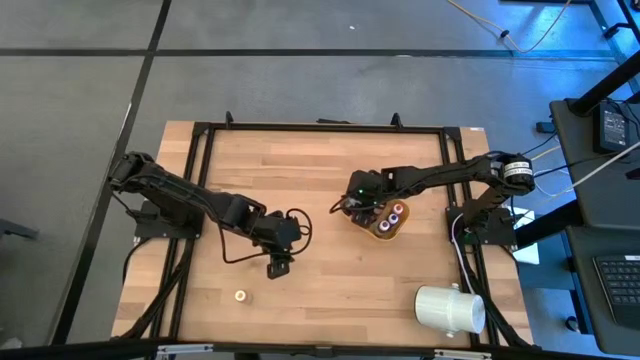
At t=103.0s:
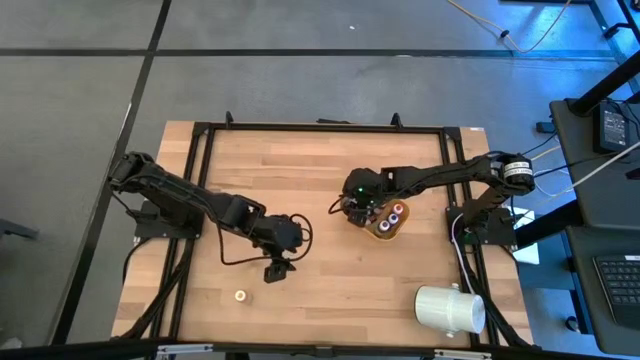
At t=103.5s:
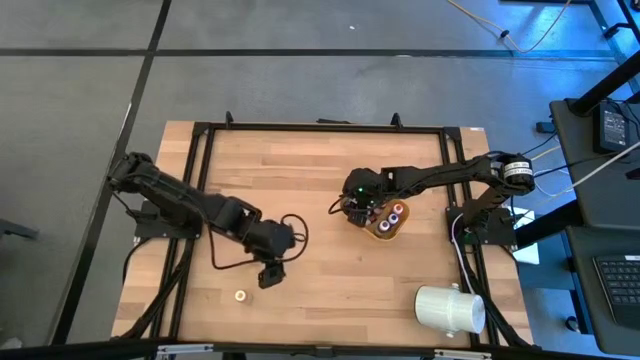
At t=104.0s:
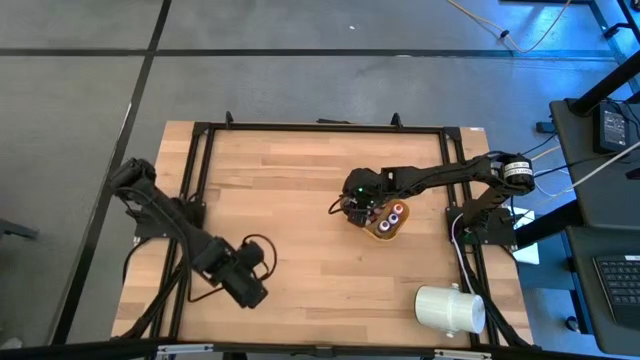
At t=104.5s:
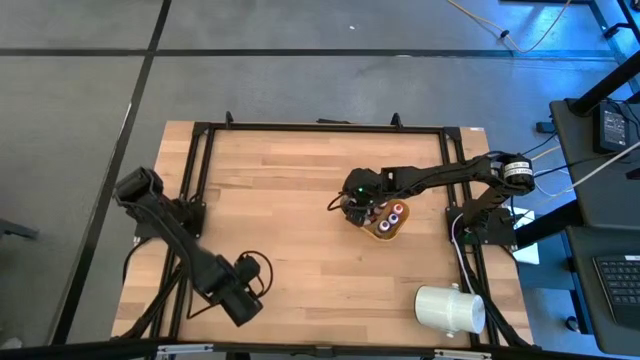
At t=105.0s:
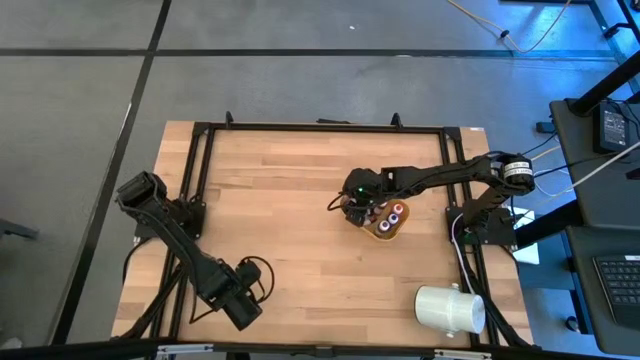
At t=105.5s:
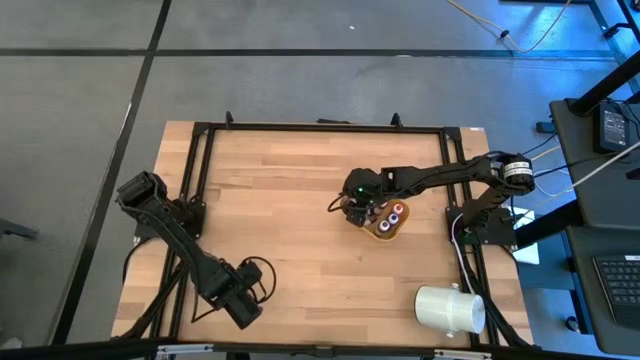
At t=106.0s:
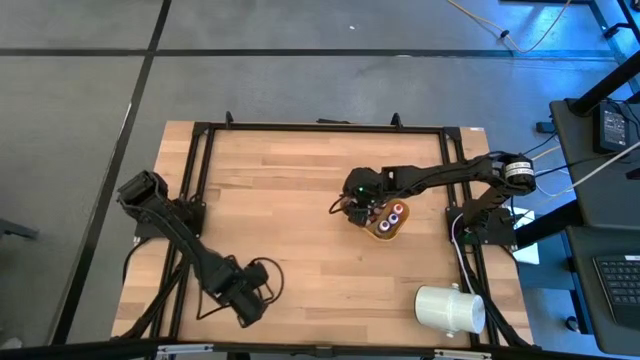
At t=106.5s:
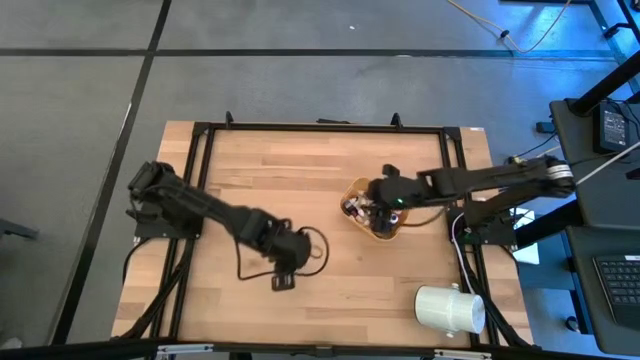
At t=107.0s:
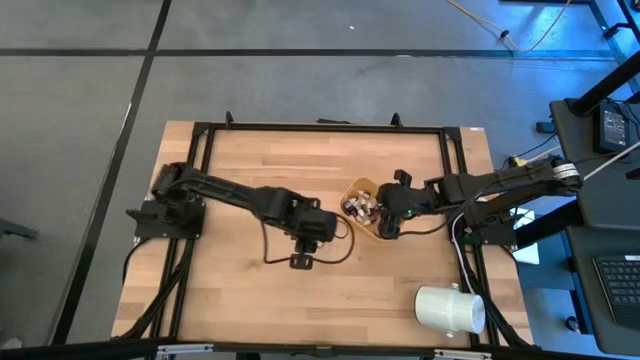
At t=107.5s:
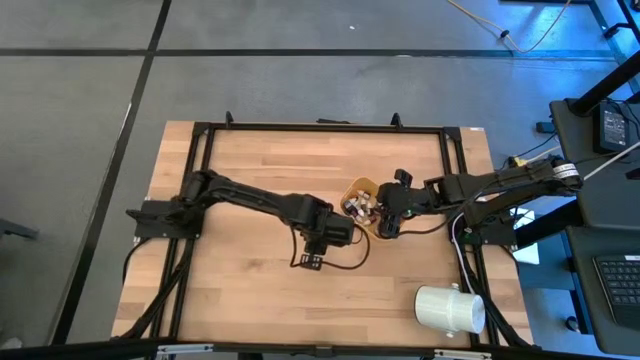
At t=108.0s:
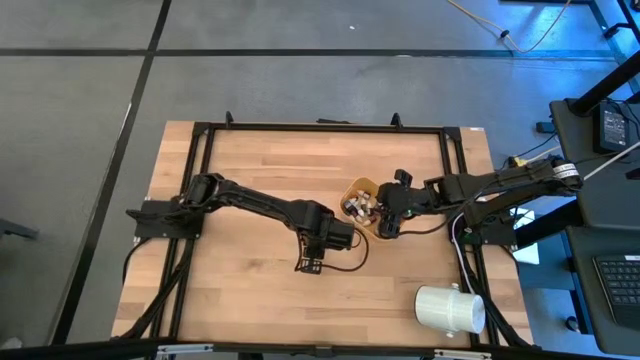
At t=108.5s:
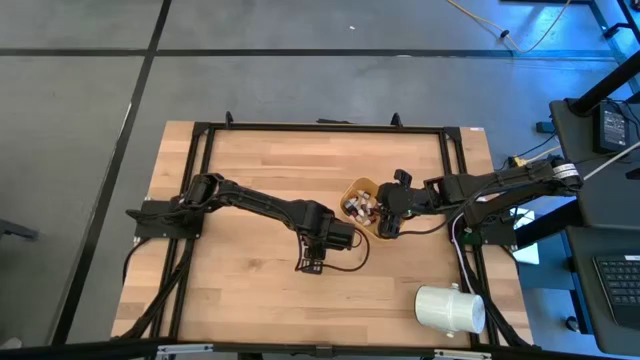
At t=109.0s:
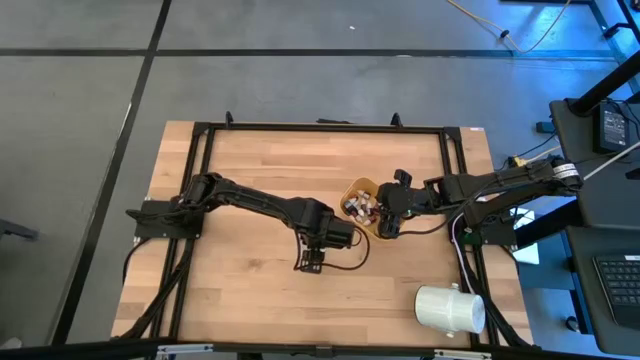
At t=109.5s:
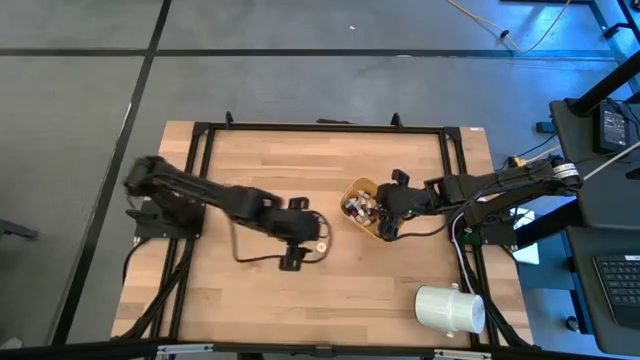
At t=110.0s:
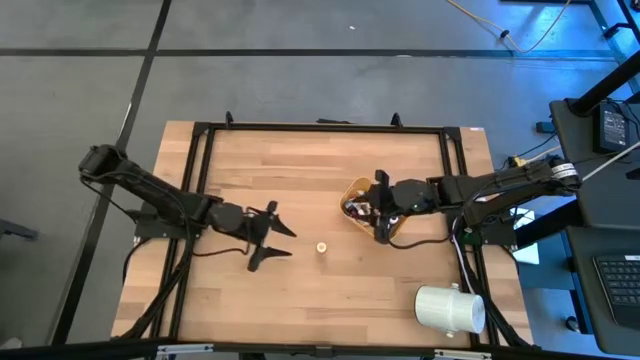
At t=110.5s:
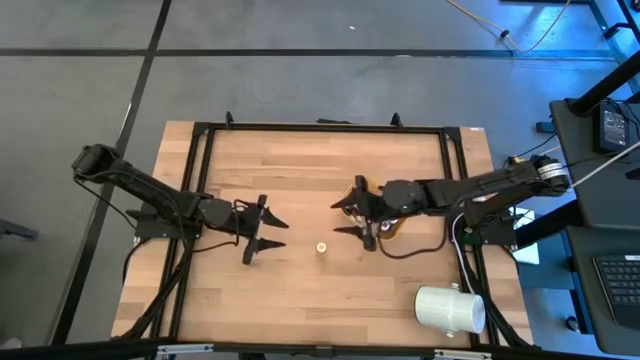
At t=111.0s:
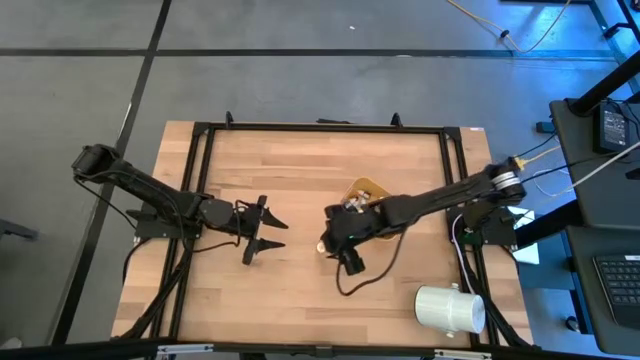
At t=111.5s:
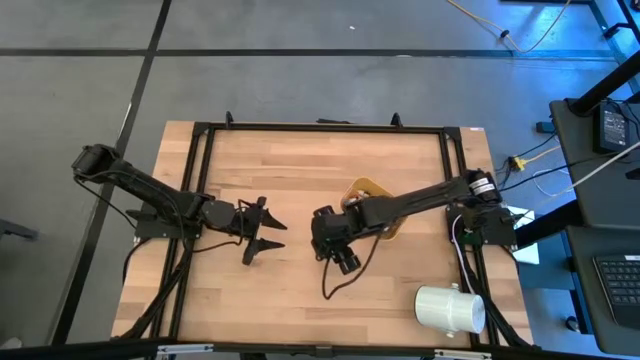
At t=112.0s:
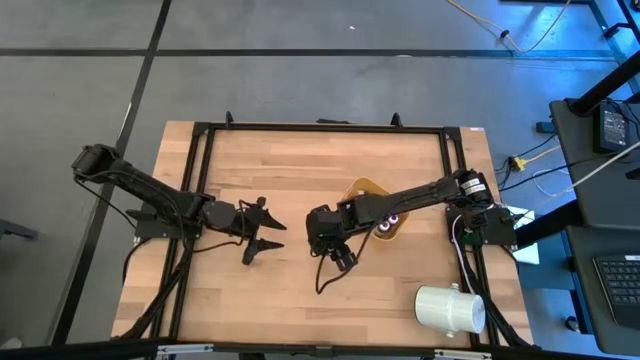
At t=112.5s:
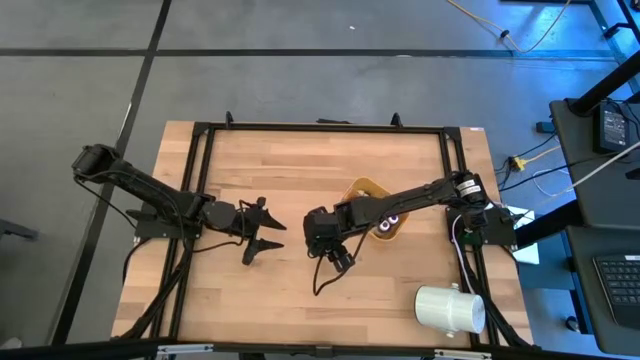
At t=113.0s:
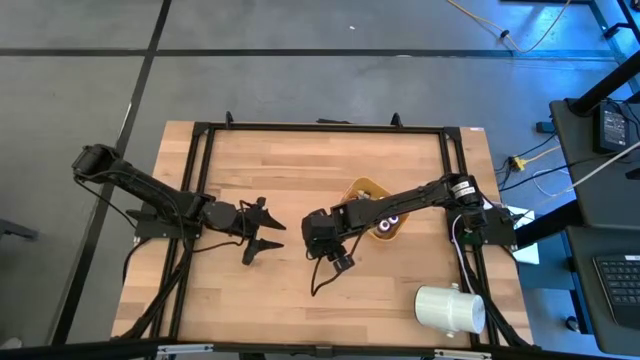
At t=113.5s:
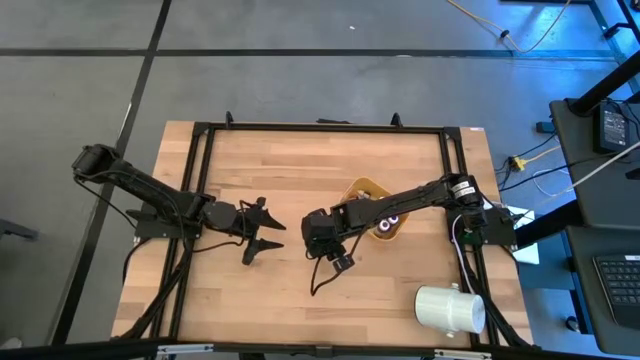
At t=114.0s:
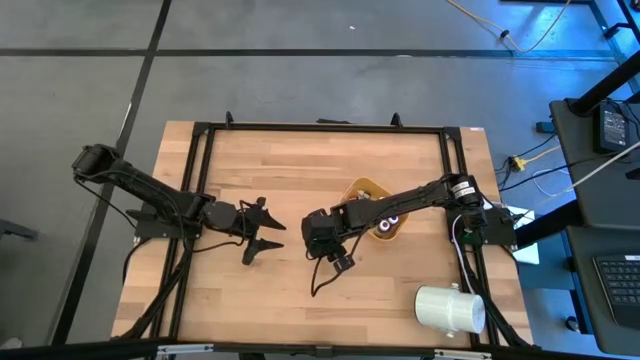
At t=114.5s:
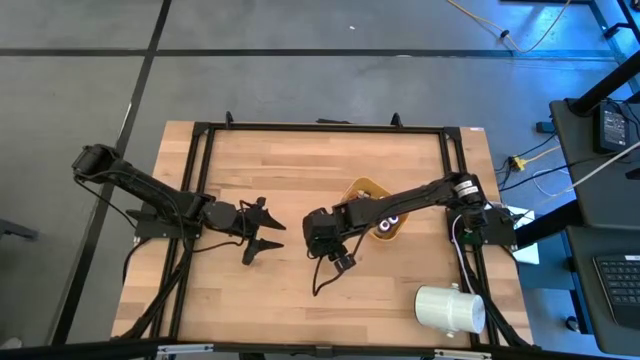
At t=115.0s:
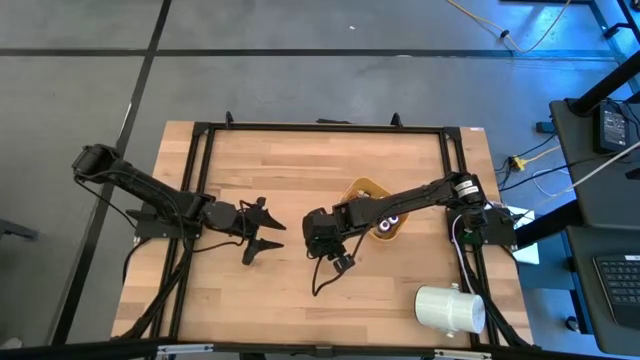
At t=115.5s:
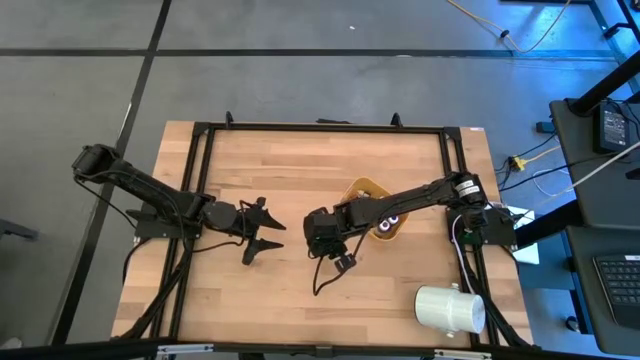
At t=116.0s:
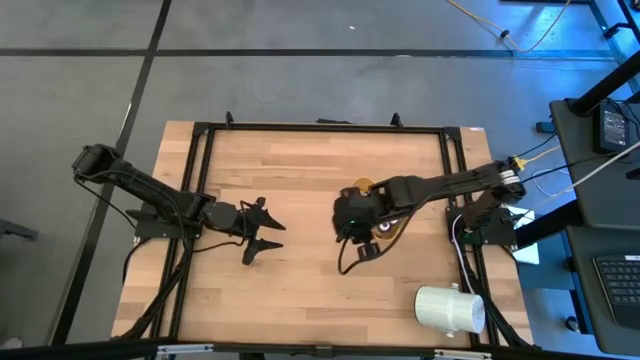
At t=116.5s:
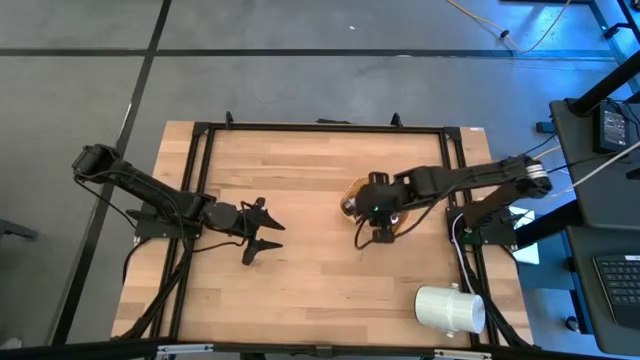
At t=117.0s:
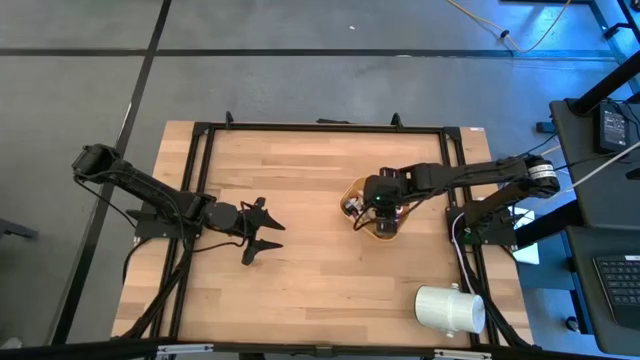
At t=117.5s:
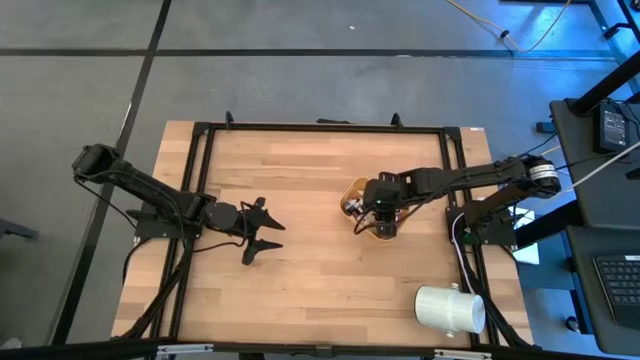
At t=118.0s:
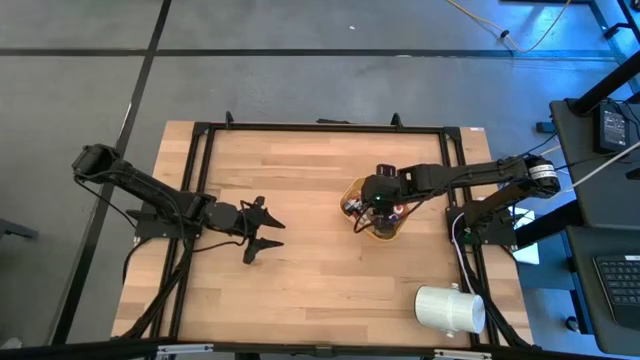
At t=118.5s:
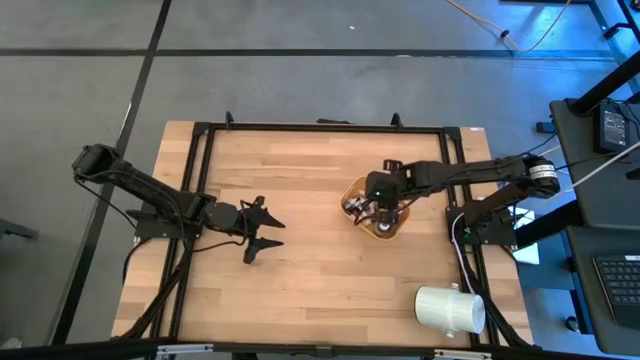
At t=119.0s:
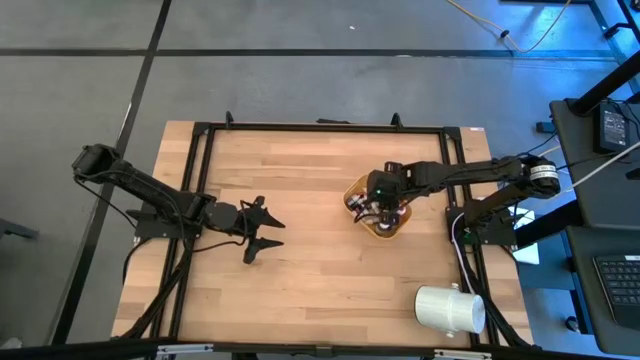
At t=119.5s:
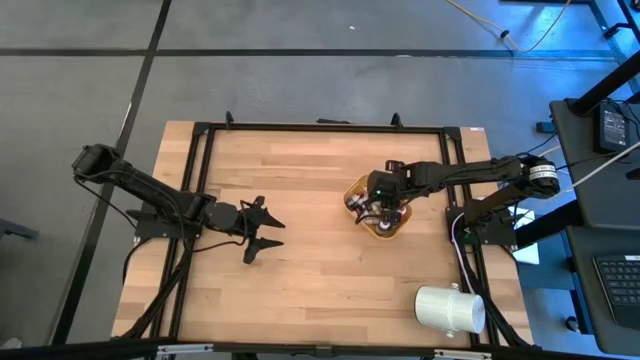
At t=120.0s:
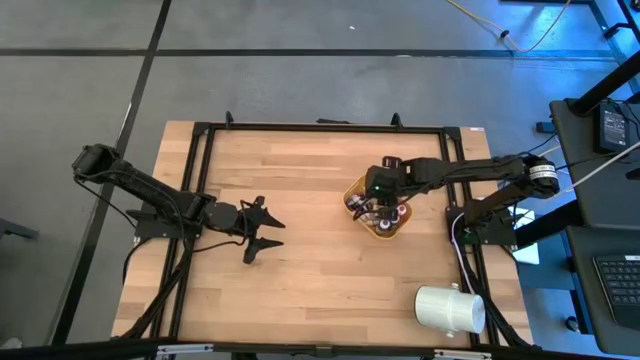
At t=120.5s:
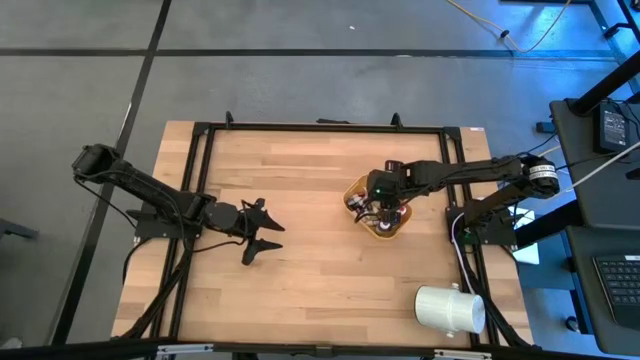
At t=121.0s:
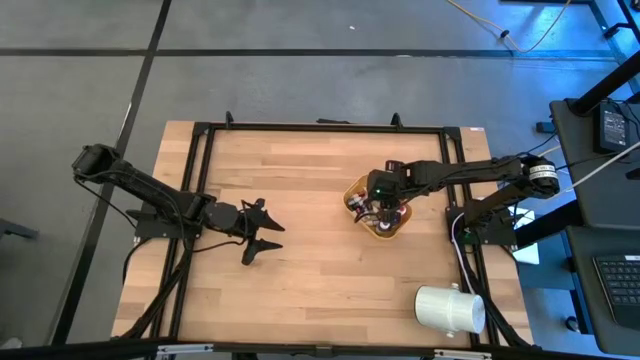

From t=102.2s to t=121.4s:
Task: Pick & Place food coloring
Put the large yellow food coloring bottle in the yellow bin
